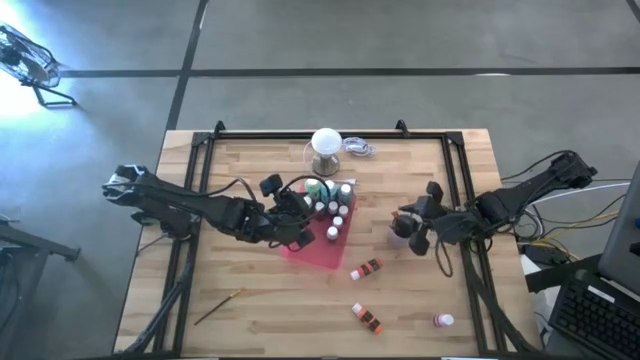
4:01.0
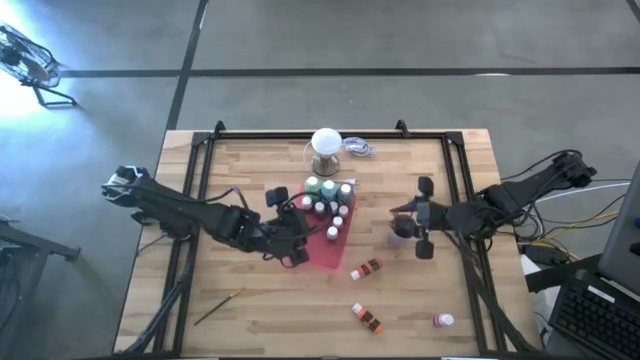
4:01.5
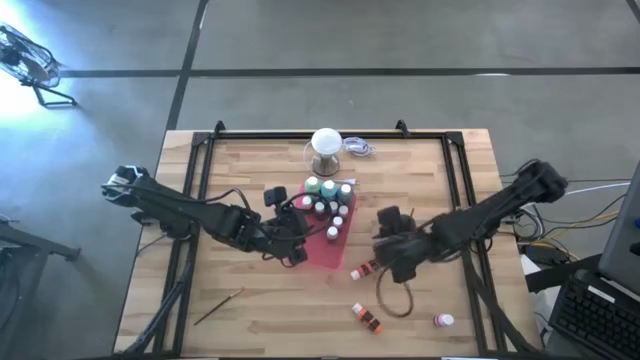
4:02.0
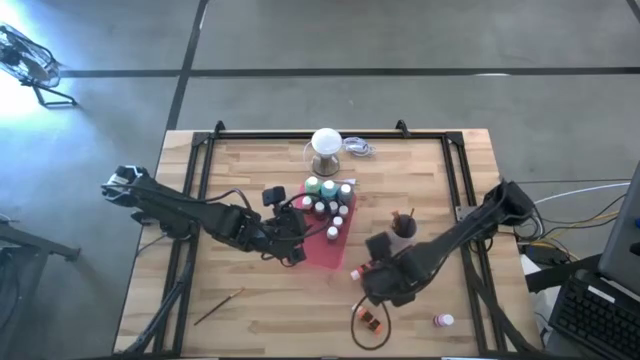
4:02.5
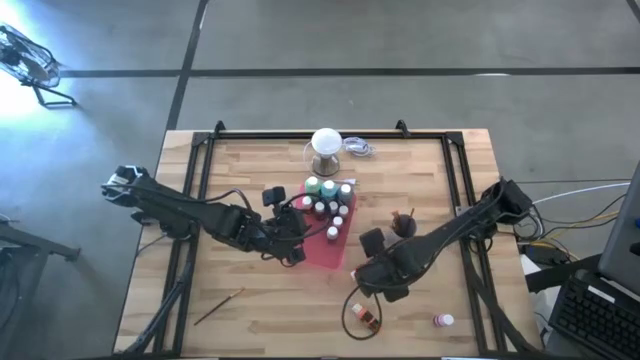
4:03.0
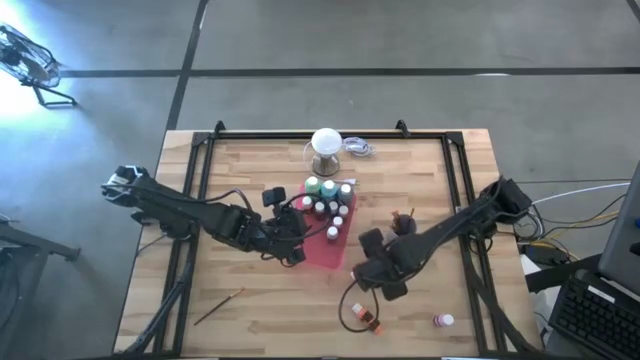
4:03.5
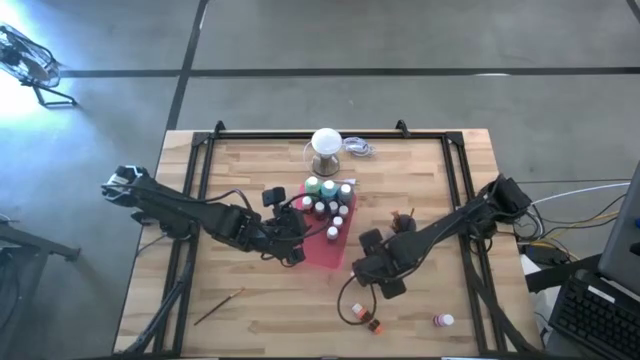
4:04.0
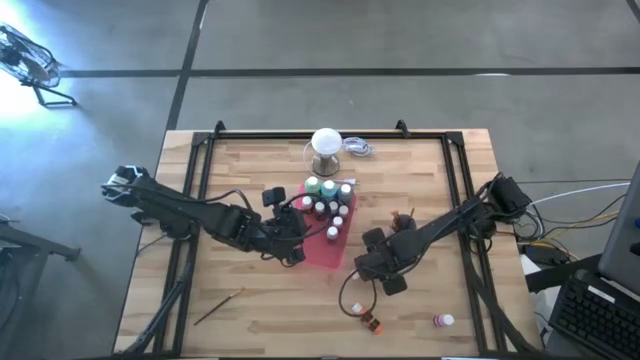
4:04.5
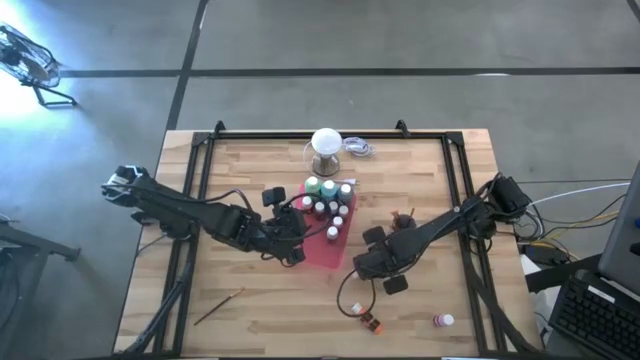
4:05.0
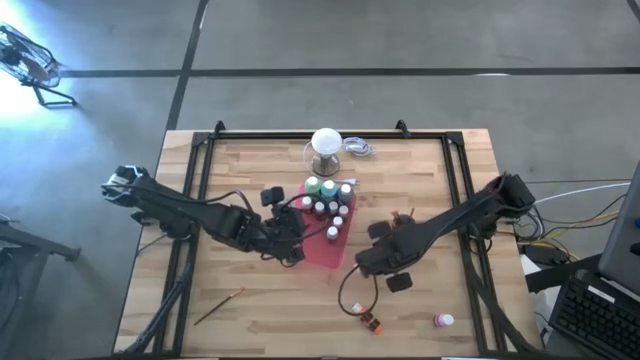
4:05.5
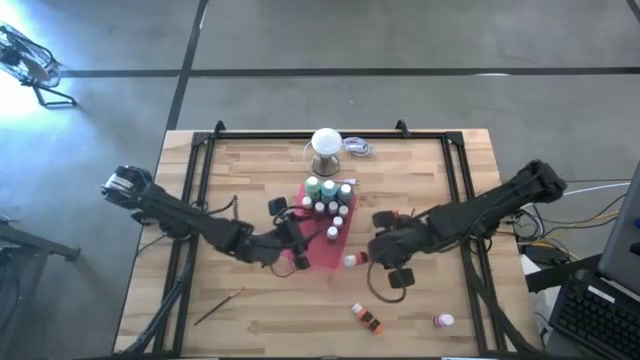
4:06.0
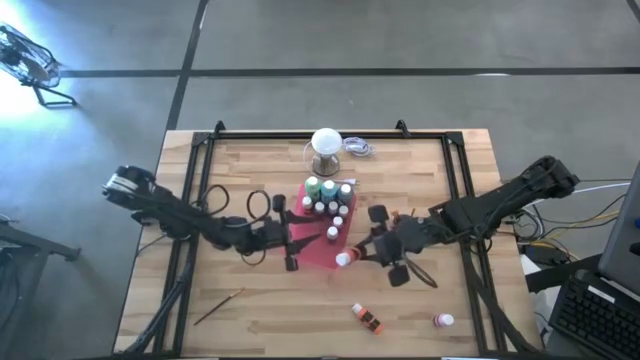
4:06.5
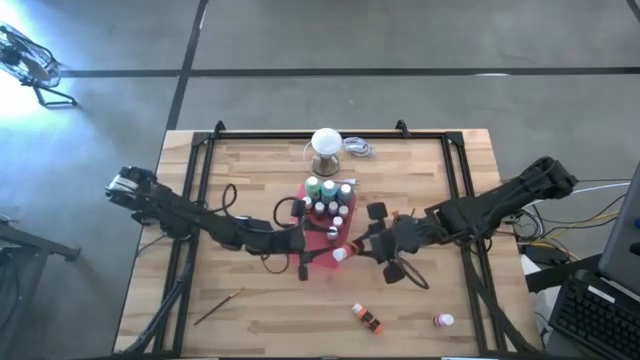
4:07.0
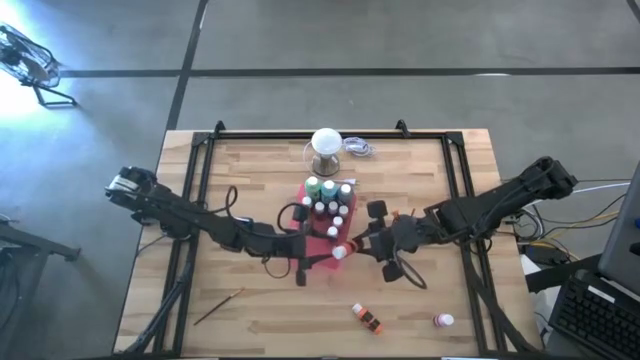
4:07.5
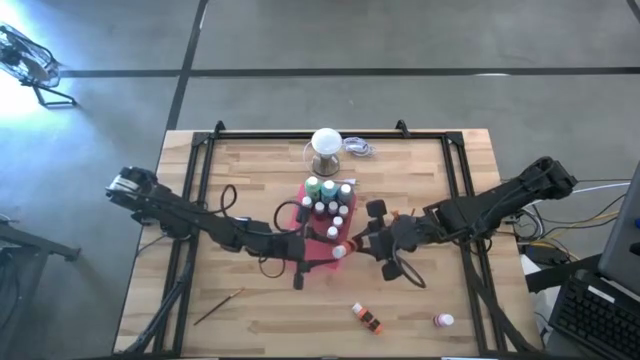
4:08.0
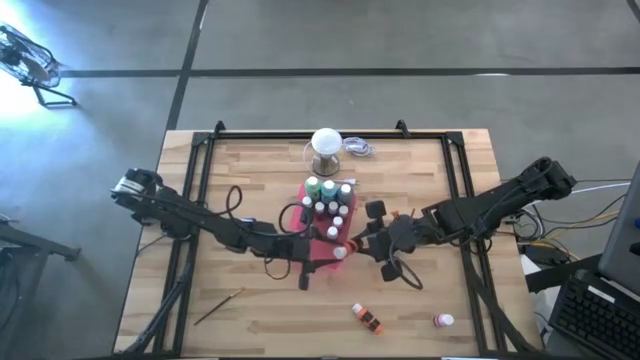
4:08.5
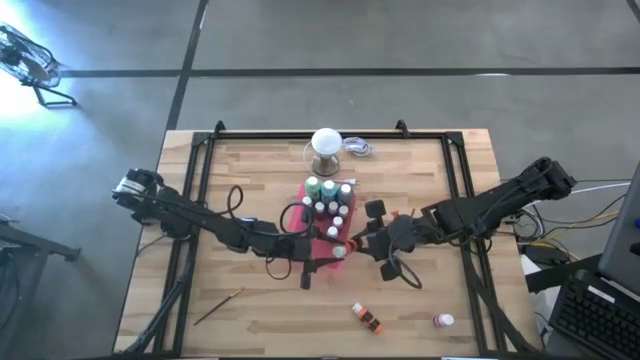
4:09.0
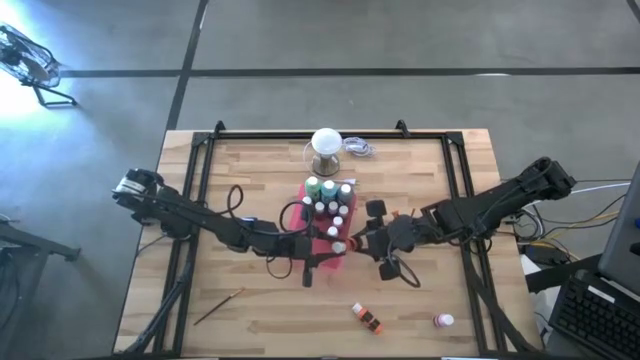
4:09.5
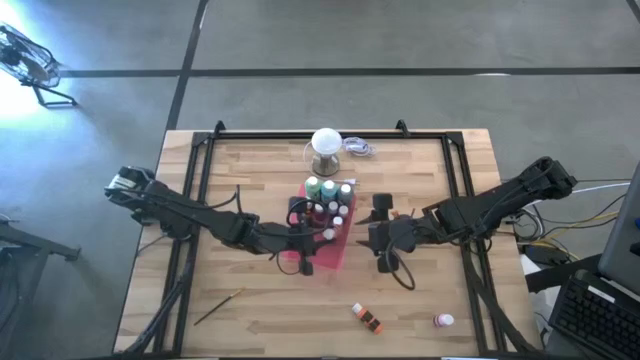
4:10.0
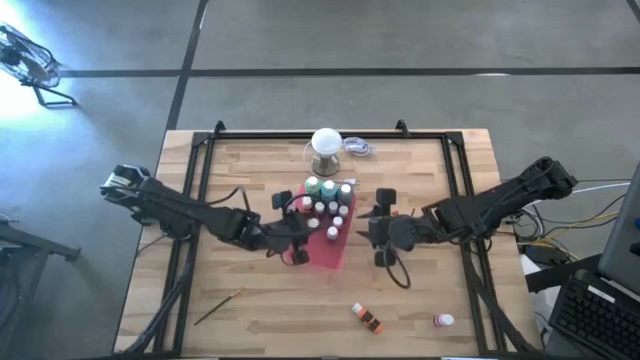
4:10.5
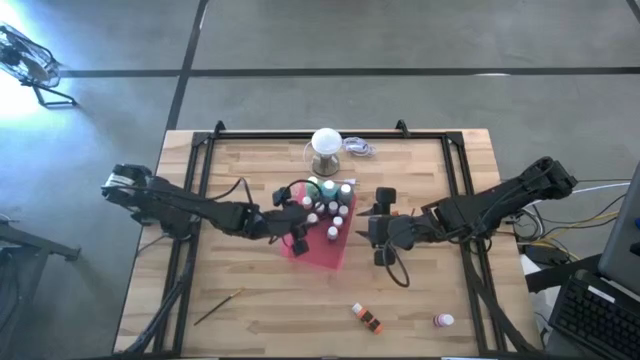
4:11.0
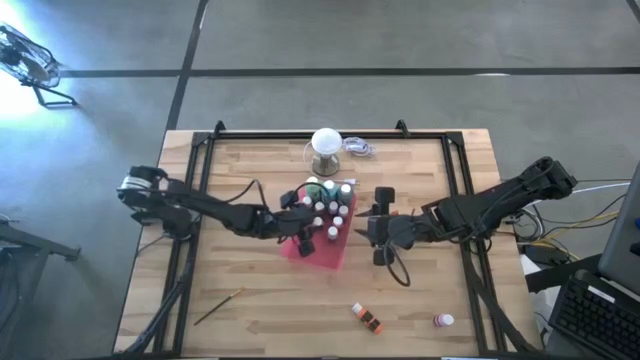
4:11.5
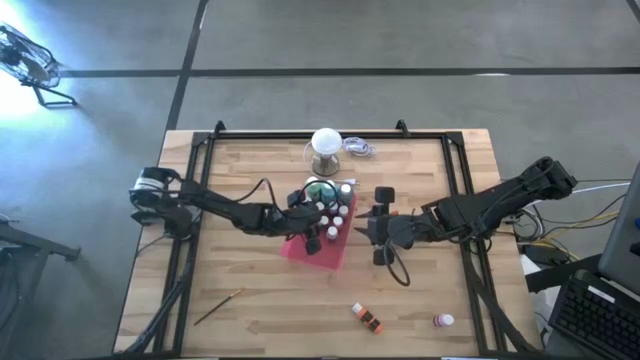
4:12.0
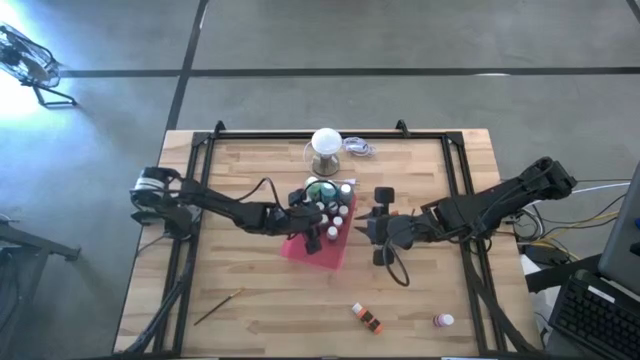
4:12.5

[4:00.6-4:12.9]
Task: Pick & Place Paint Supplies
Put the small orange paint bottle into the red bin

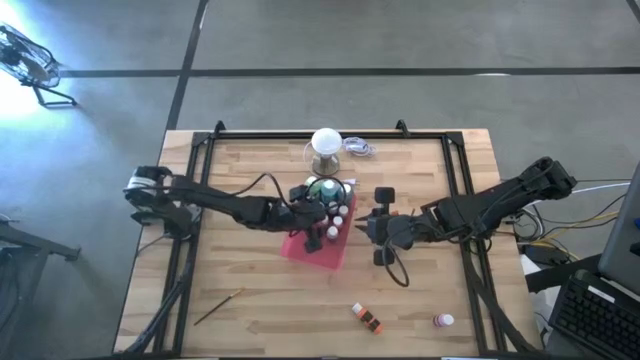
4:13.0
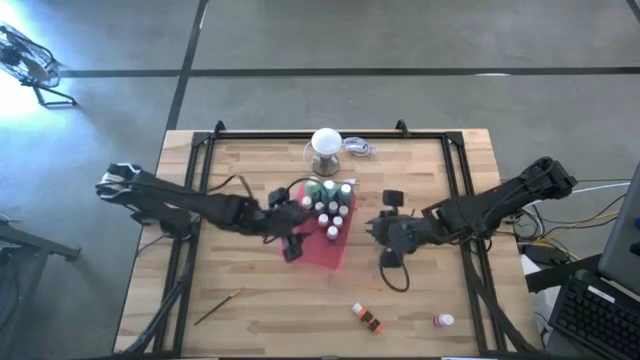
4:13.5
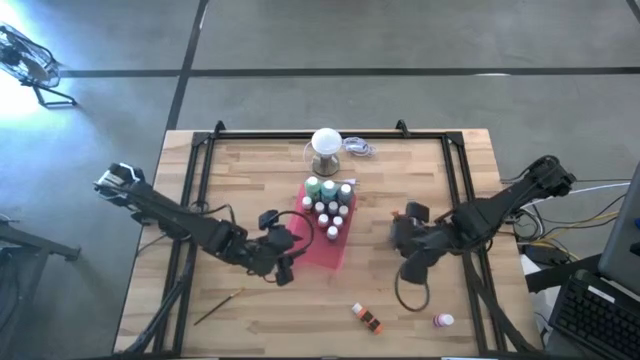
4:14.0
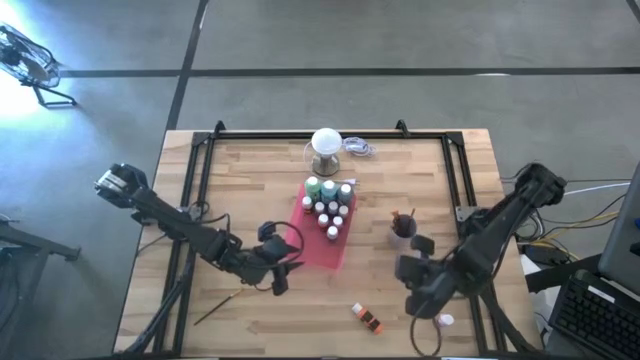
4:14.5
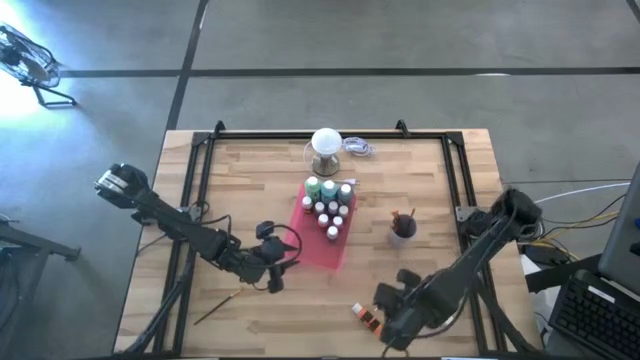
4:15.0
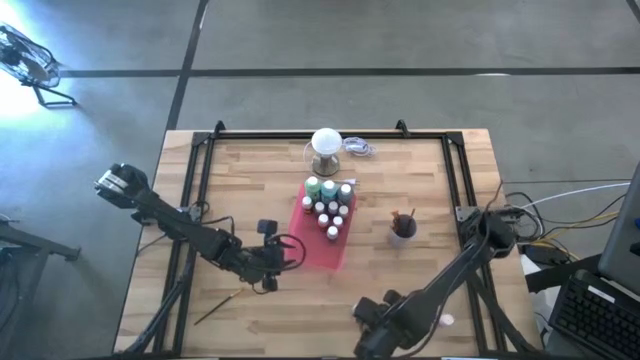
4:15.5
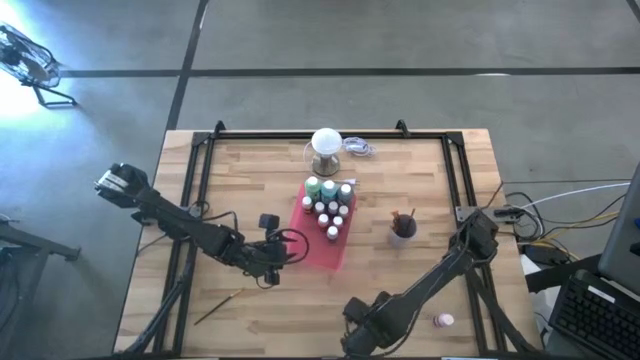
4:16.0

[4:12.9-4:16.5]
Put the small orange paint bottle into the red bin

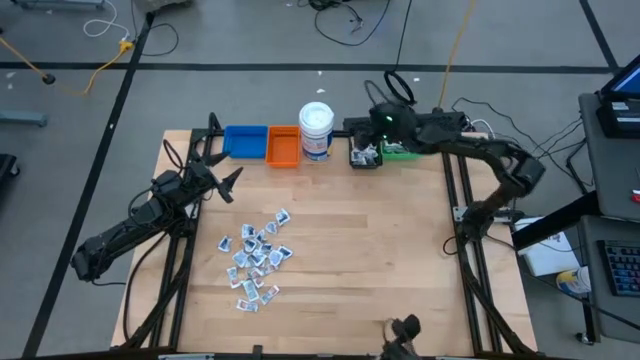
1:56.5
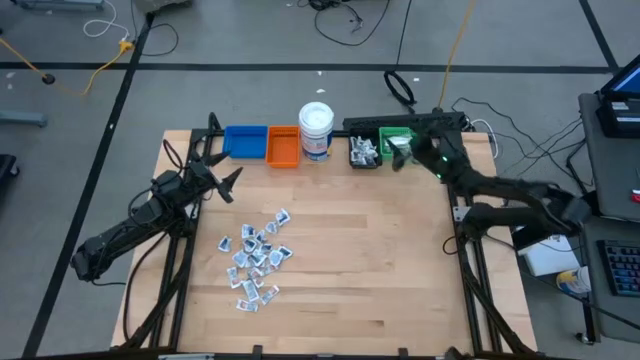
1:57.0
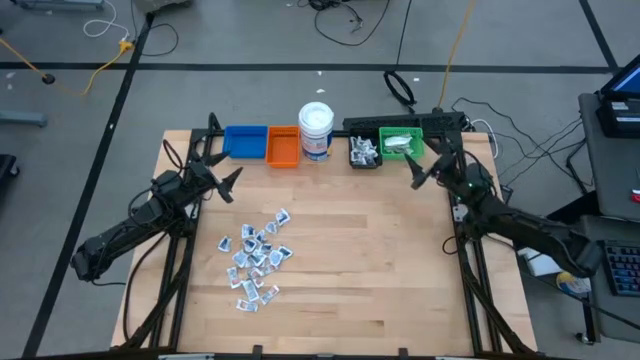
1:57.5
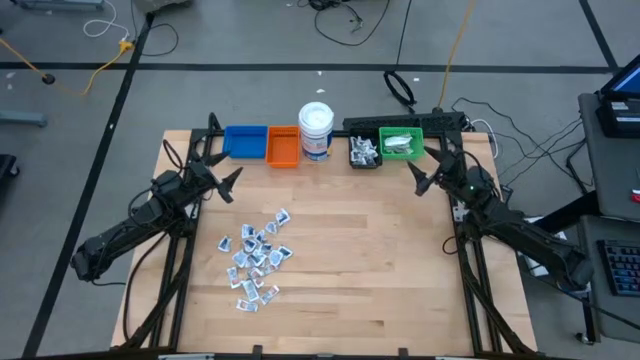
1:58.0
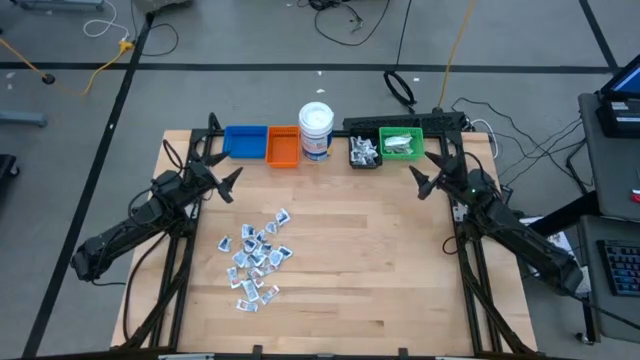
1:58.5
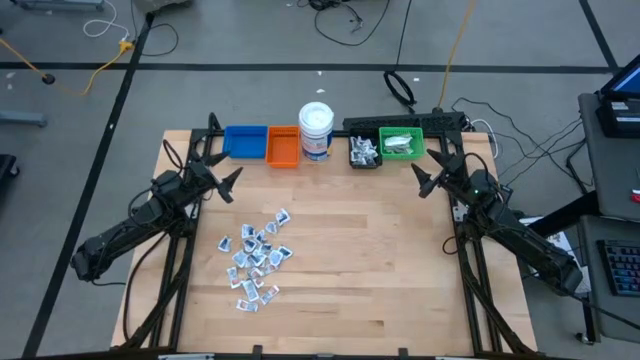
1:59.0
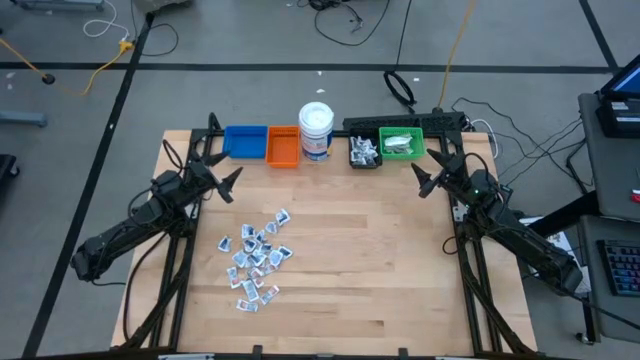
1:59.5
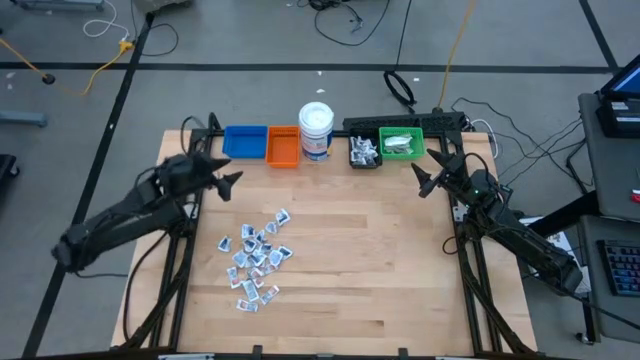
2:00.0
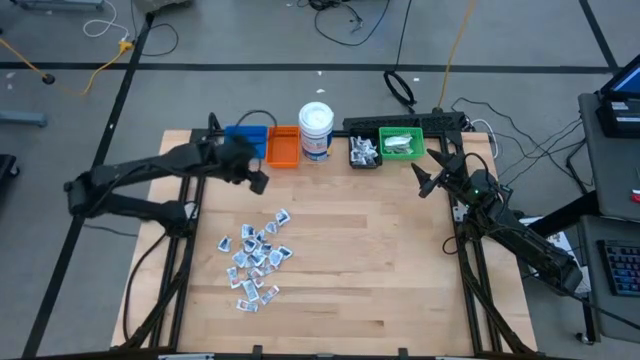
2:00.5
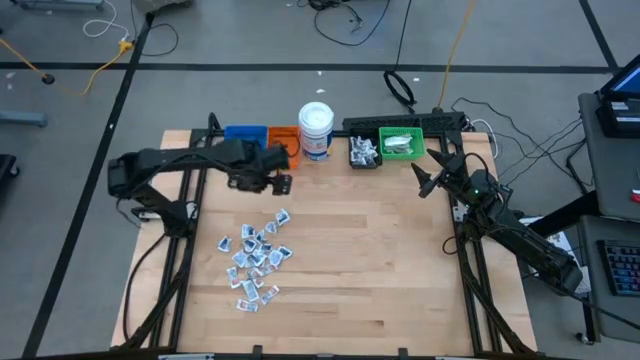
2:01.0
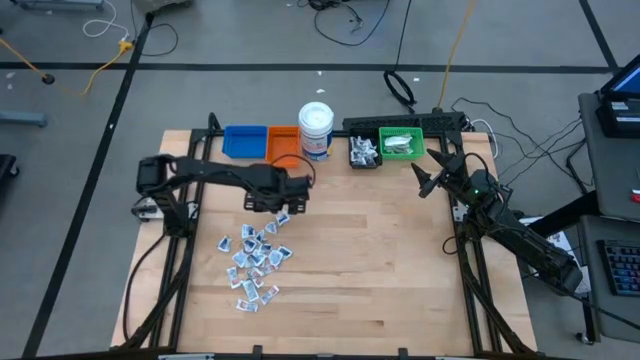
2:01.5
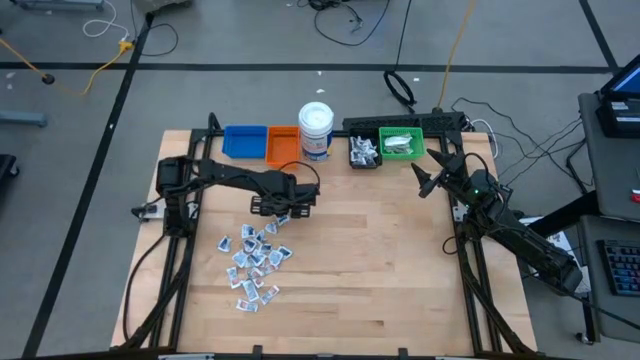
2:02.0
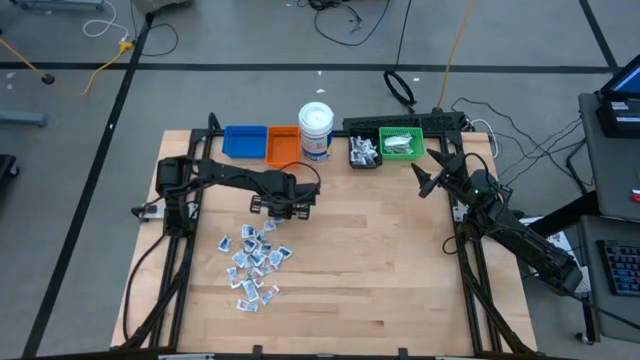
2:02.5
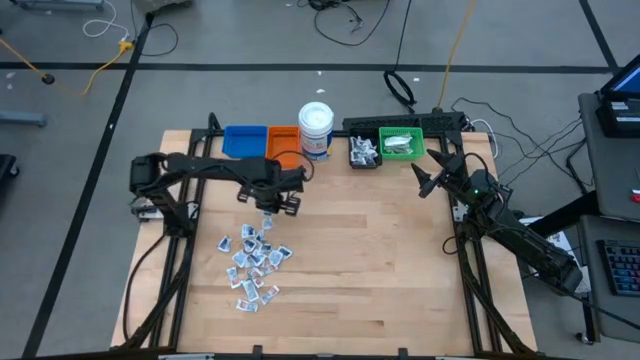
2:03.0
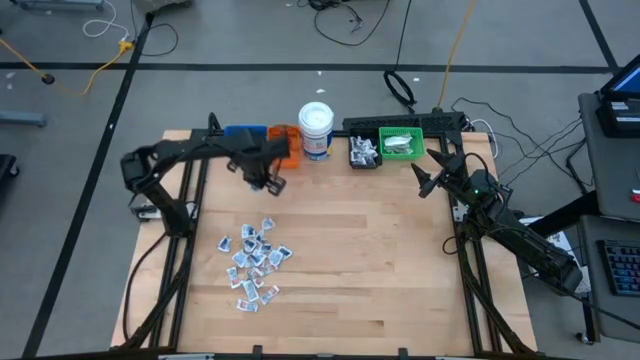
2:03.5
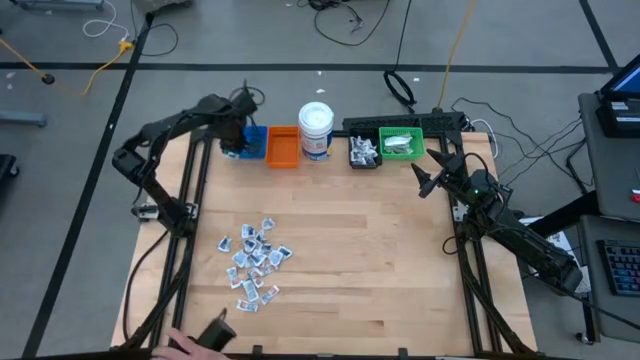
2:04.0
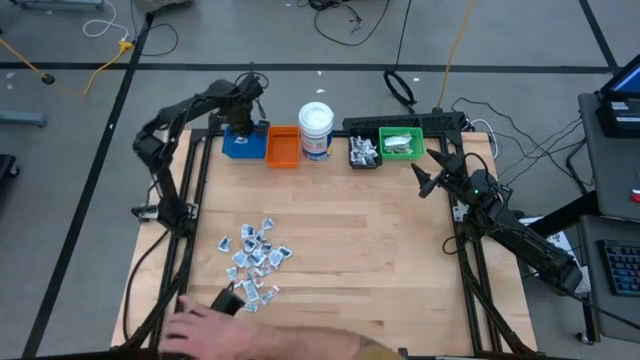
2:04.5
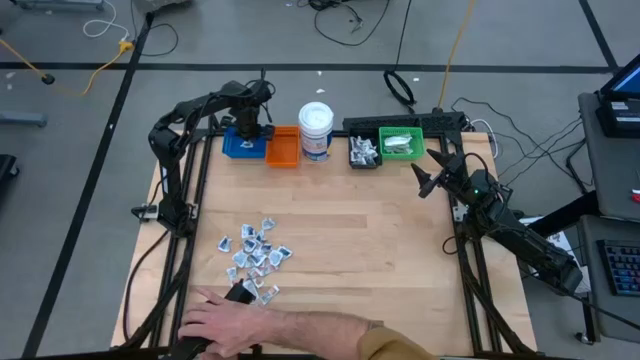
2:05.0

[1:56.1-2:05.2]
Task: Pick & Place First Aid Supplies
Put the alcohol pad into the blue bin
